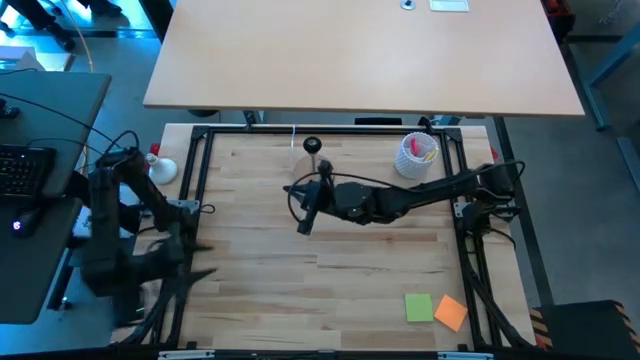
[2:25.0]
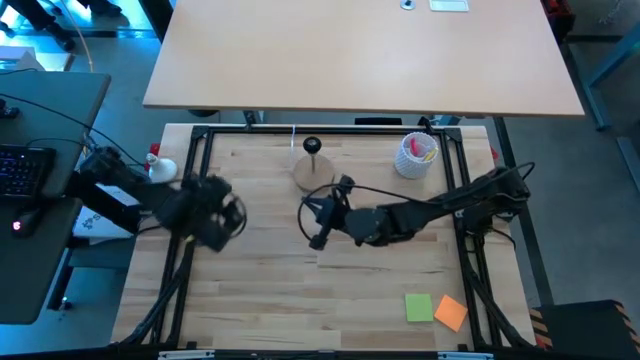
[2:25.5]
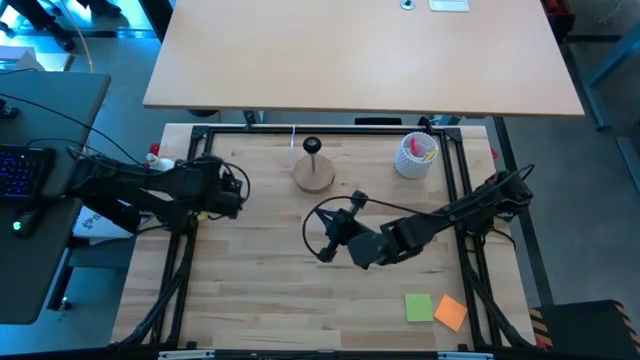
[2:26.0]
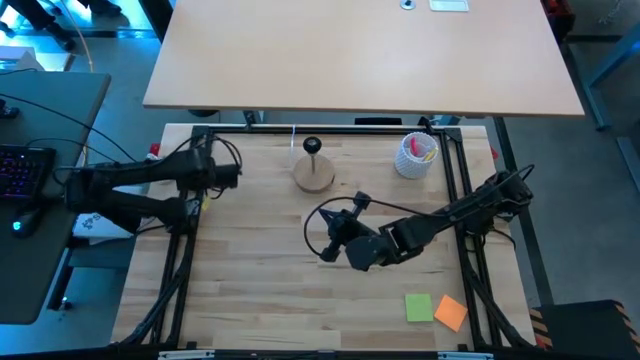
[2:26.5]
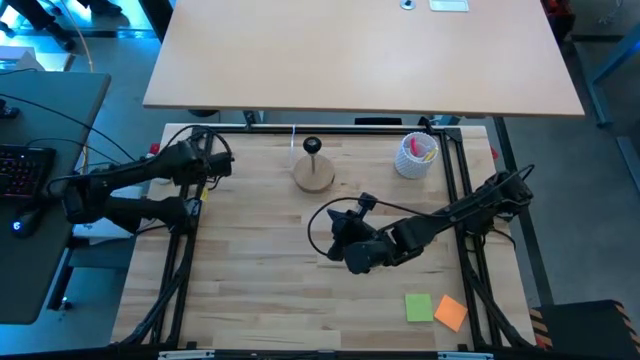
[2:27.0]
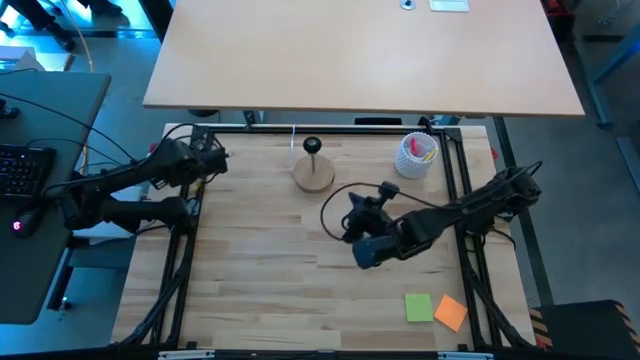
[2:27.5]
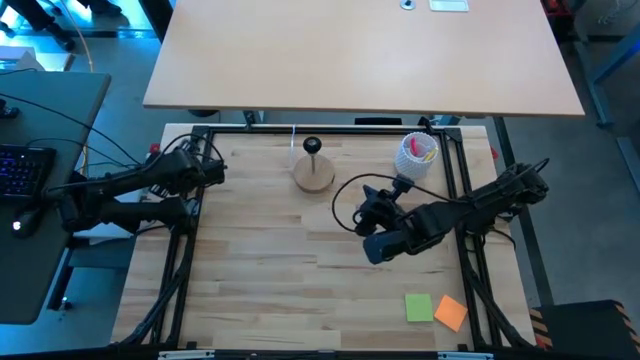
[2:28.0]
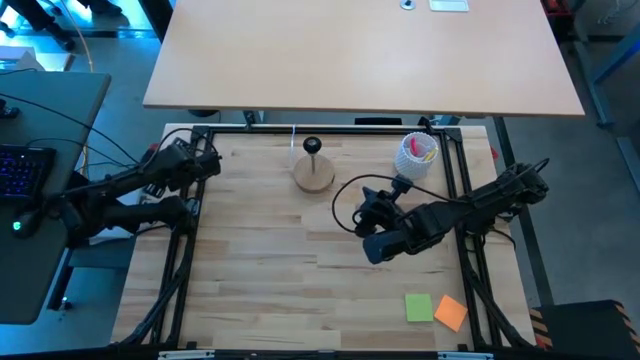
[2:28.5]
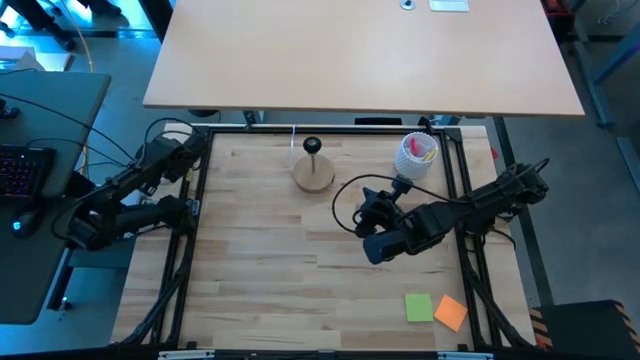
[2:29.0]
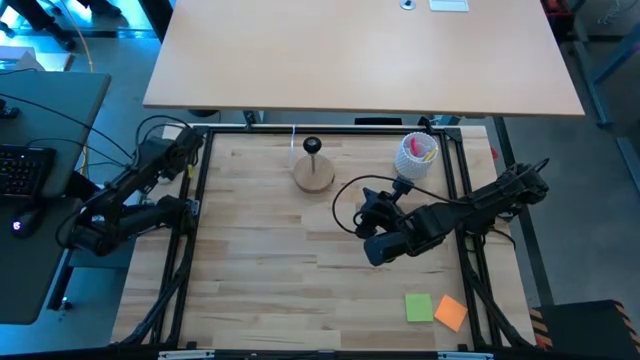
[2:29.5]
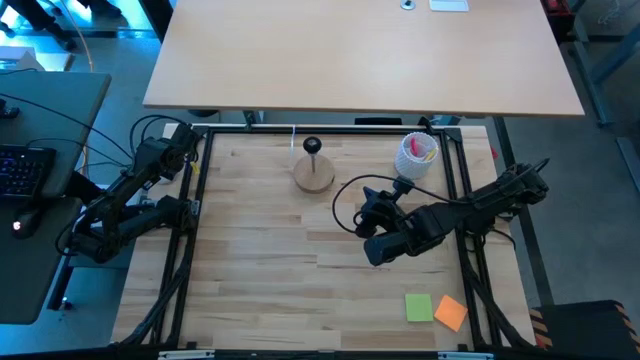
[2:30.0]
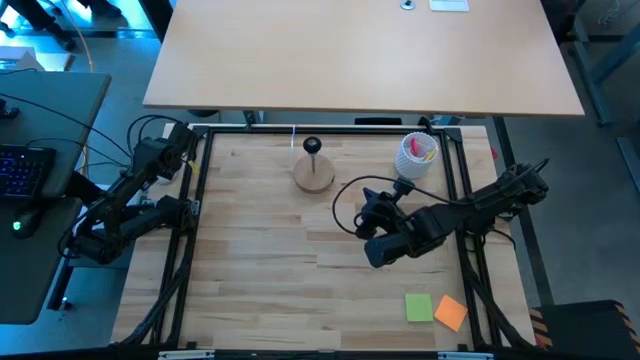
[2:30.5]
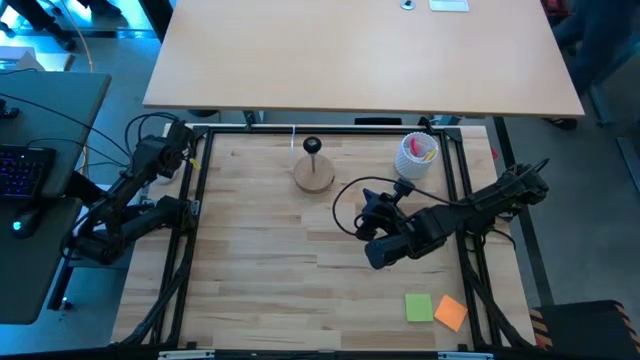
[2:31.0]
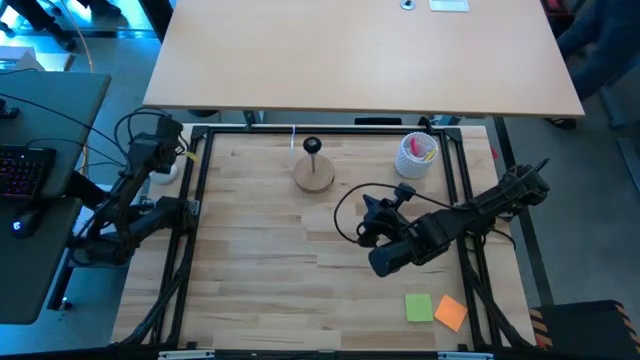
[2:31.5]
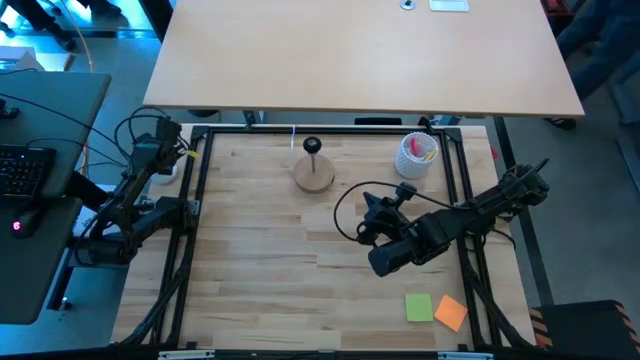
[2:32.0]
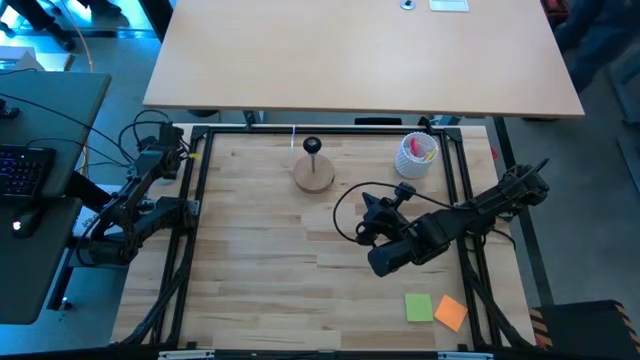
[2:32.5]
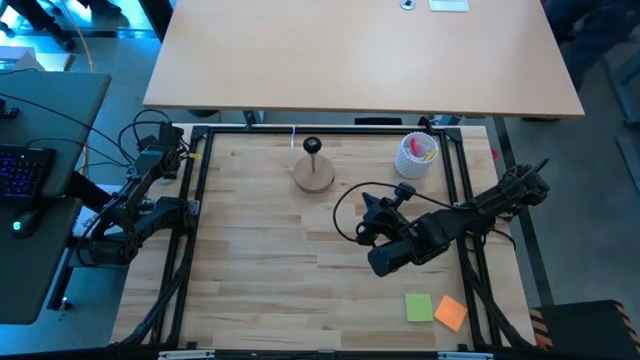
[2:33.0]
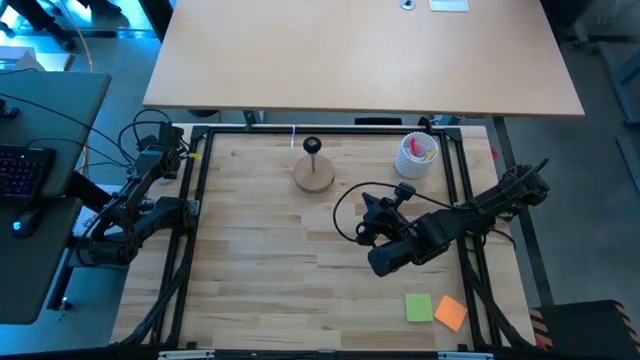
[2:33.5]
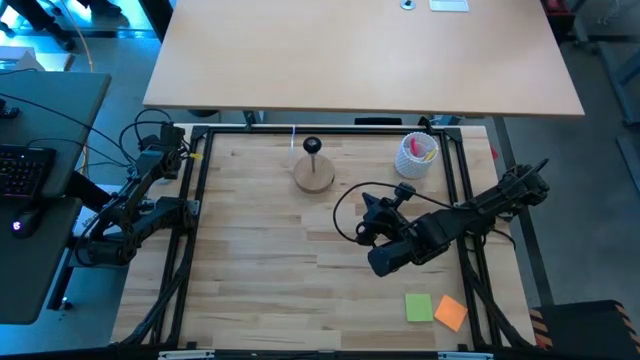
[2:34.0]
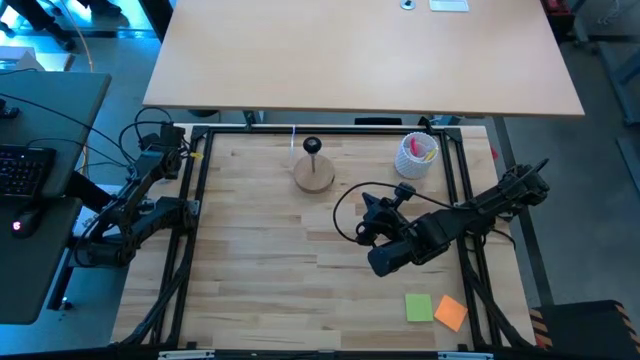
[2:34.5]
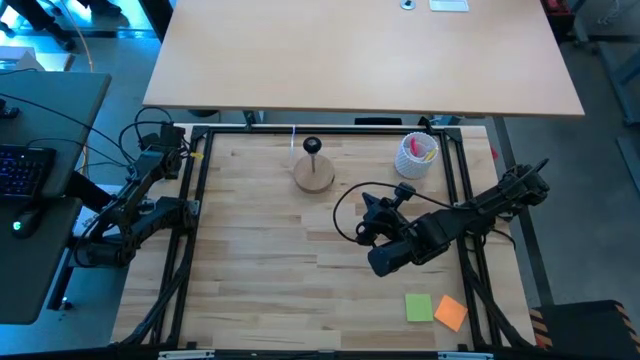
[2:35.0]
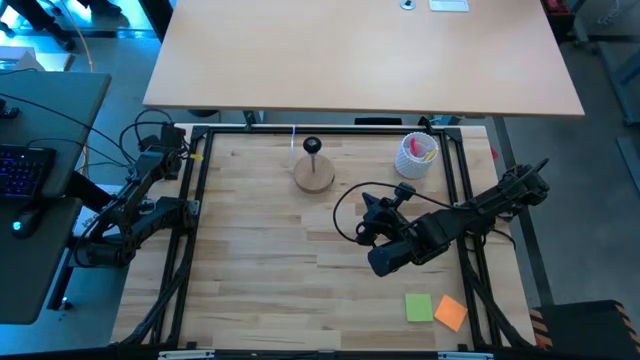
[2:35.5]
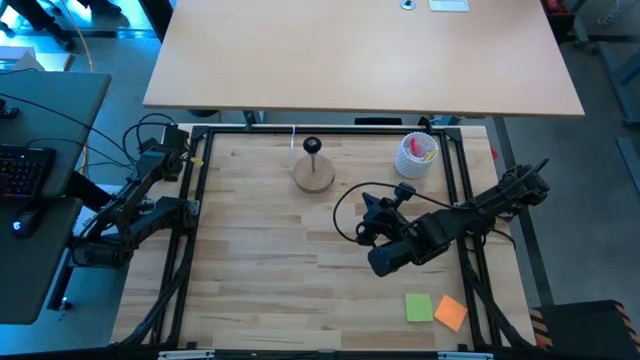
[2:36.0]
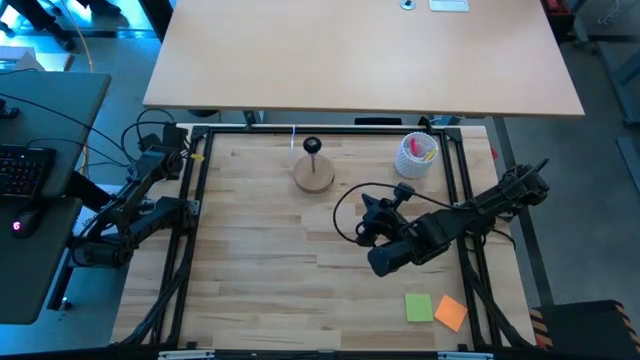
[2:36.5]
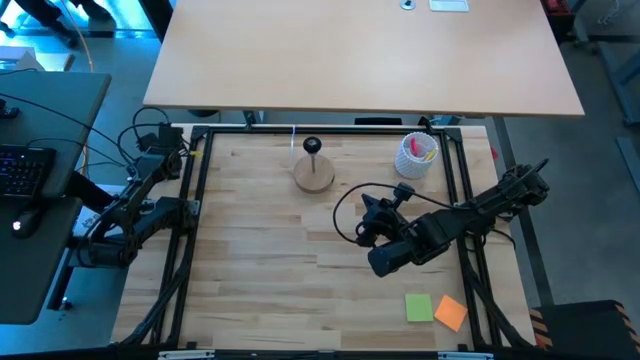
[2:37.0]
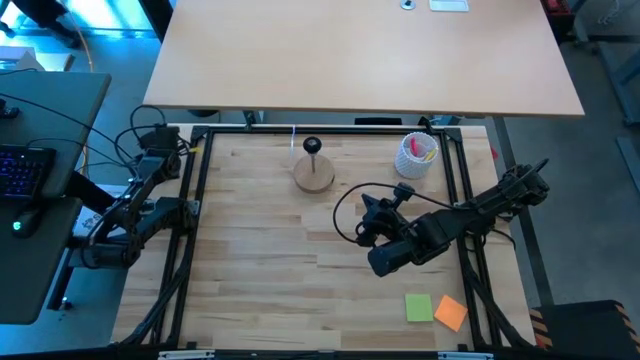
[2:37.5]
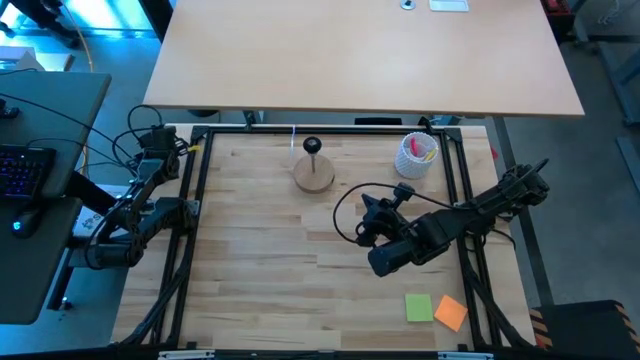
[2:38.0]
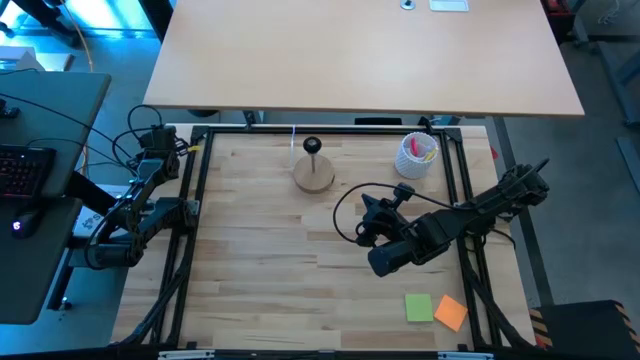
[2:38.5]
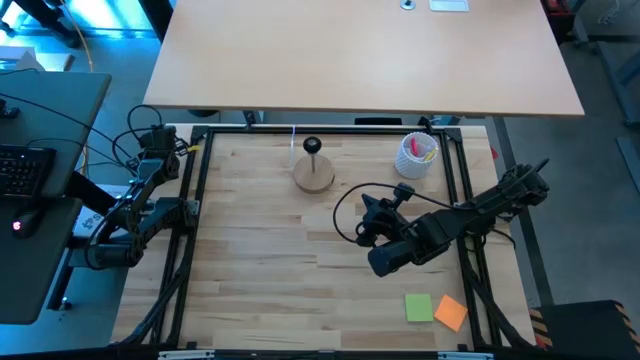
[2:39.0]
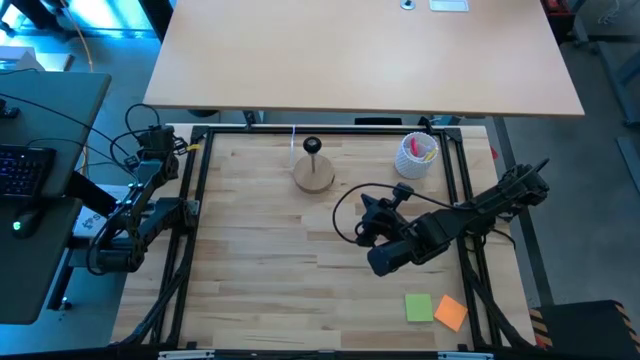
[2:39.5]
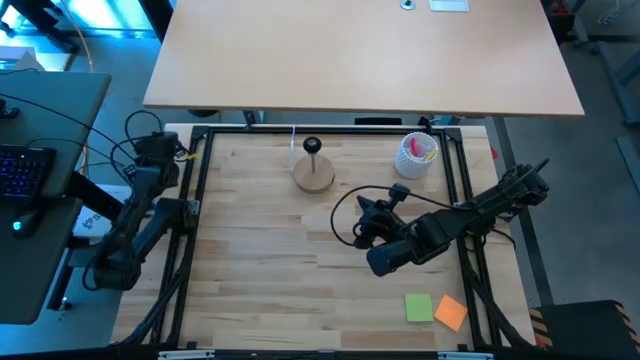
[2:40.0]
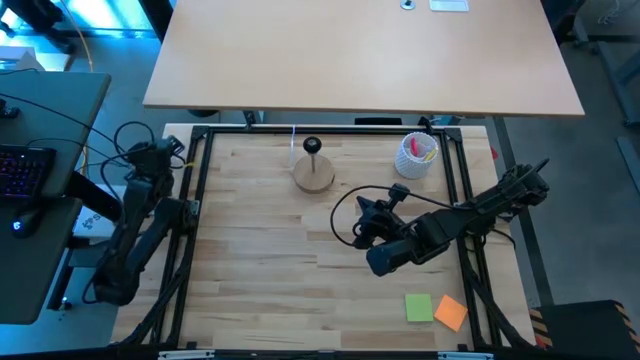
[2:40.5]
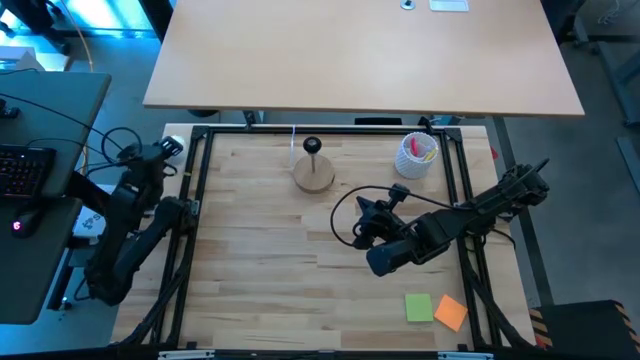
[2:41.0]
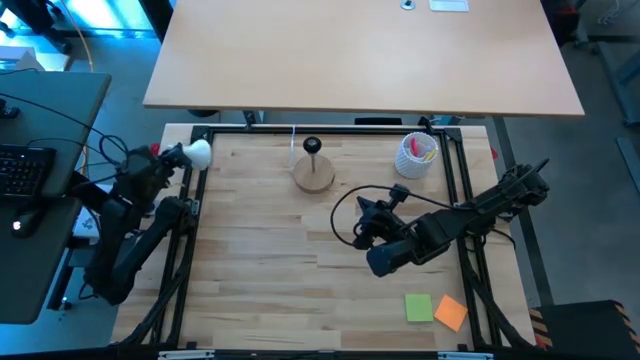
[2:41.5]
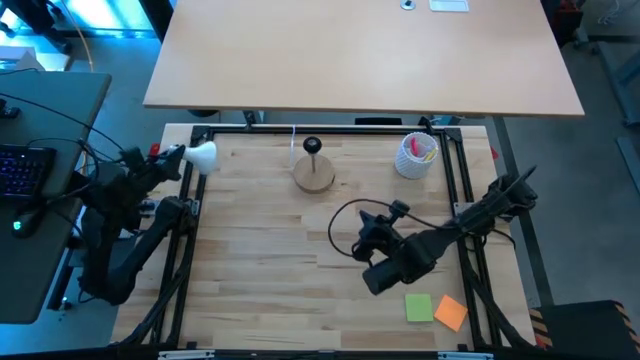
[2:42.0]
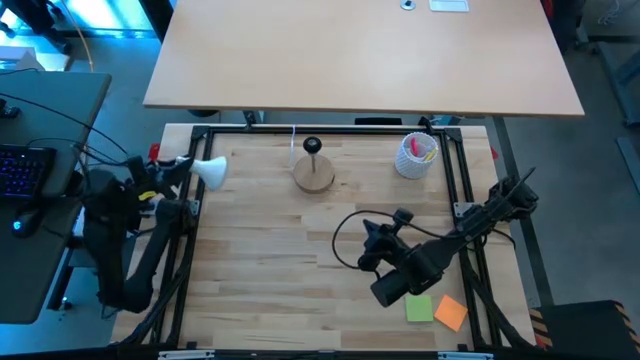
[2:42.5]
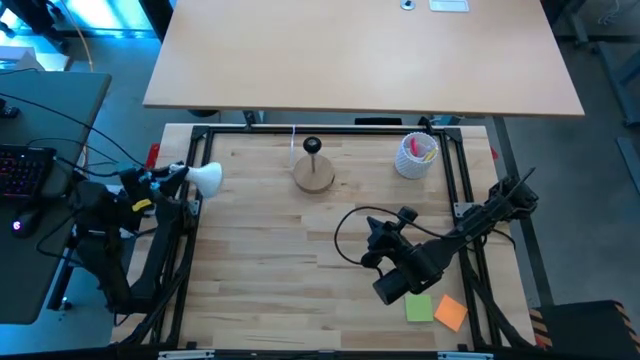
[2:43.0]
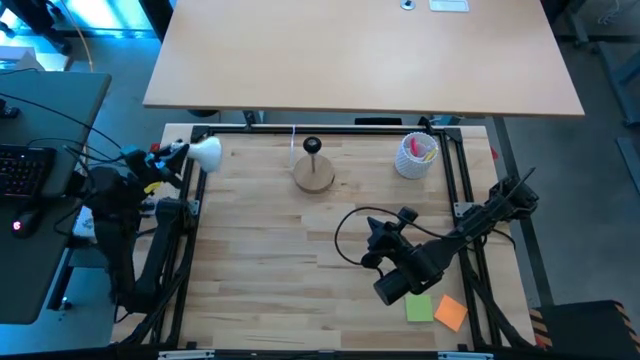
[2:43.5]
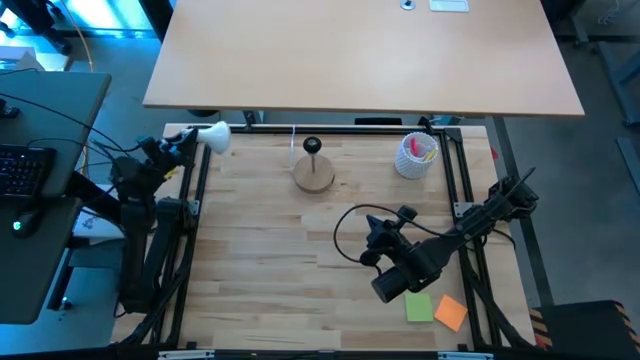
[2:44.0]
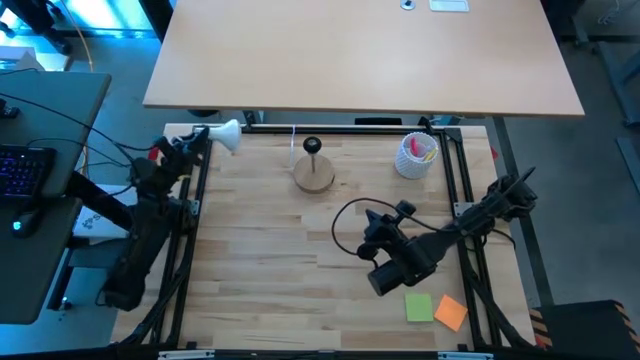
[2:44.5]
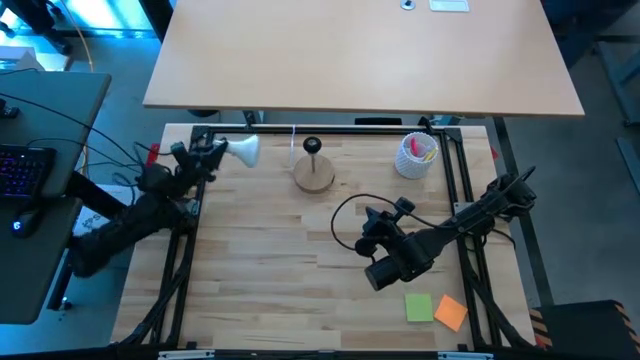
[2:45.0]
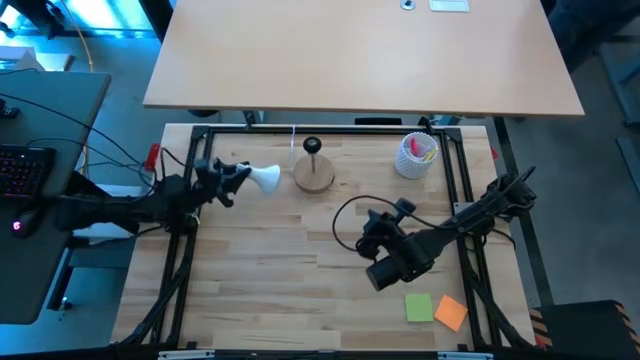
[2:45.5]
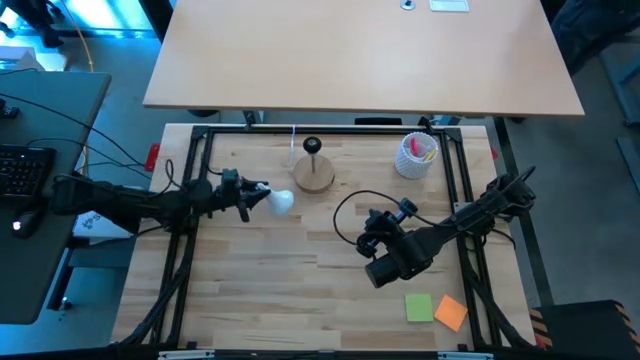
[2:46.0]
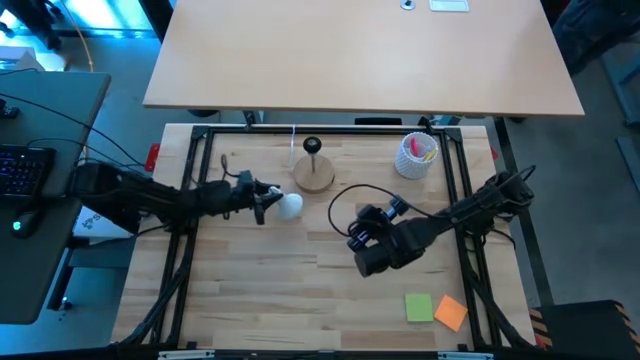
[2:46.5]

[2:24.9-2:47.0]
Task: Screw lightbulb
Remove the lightbulb from the brown lamp
